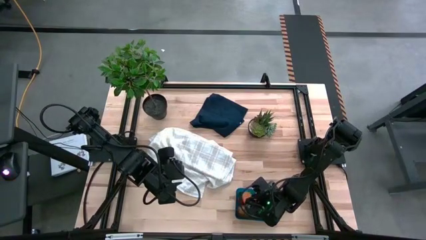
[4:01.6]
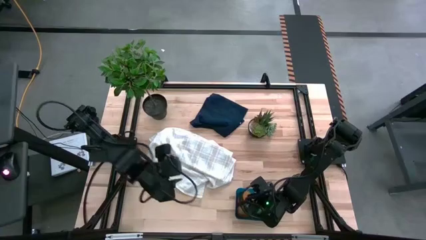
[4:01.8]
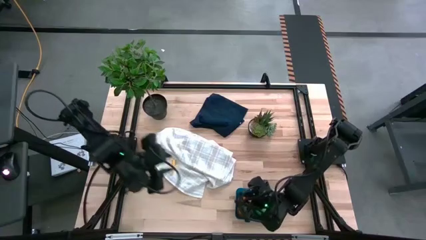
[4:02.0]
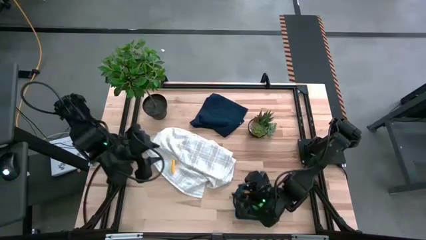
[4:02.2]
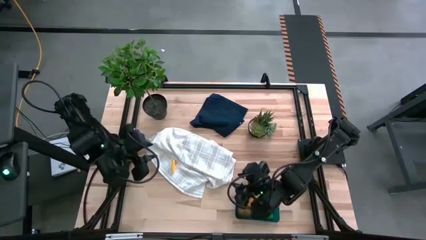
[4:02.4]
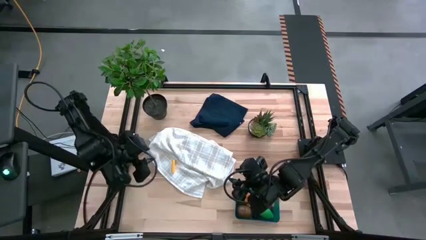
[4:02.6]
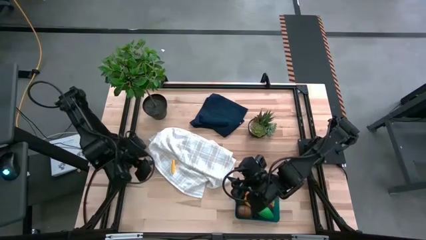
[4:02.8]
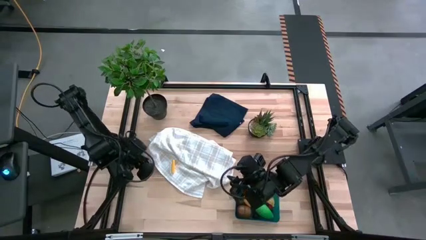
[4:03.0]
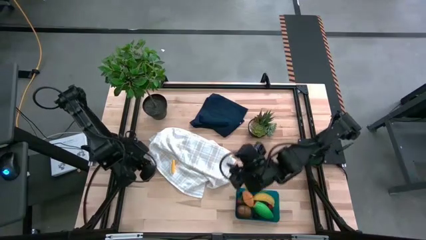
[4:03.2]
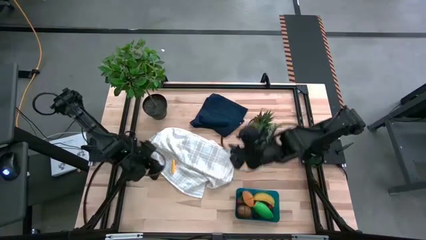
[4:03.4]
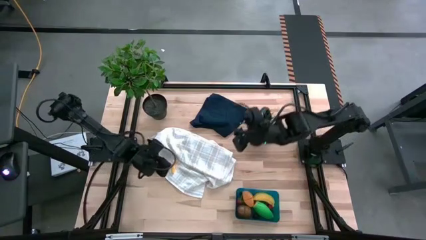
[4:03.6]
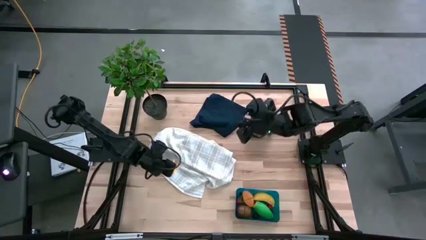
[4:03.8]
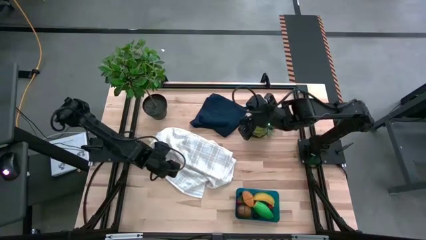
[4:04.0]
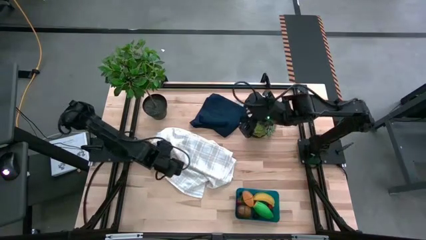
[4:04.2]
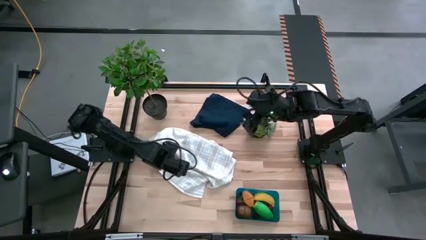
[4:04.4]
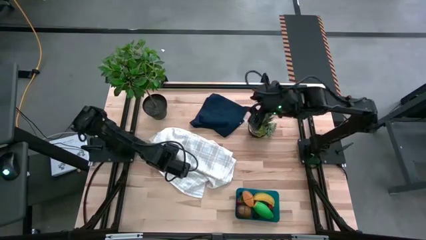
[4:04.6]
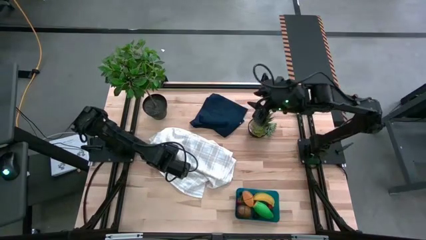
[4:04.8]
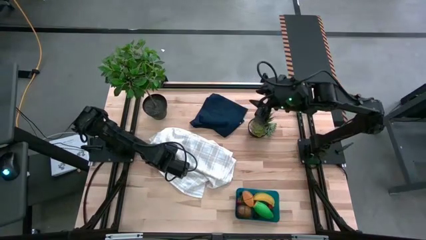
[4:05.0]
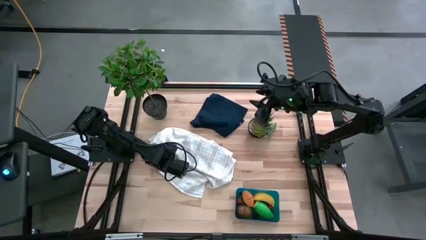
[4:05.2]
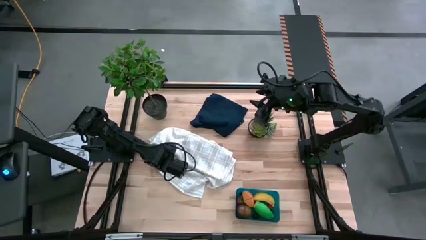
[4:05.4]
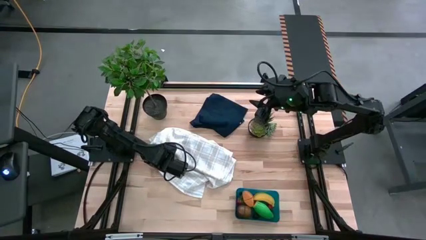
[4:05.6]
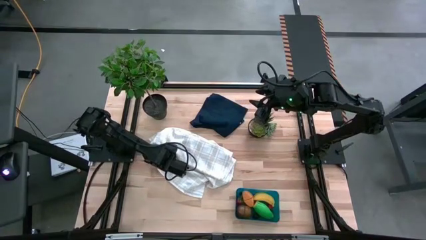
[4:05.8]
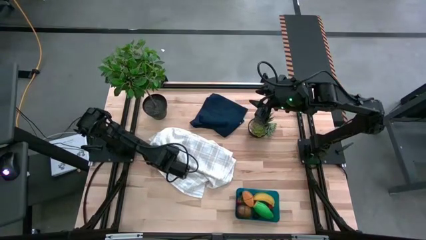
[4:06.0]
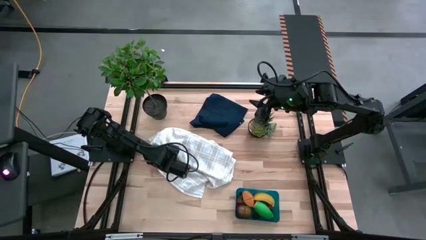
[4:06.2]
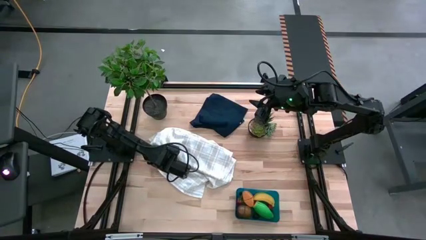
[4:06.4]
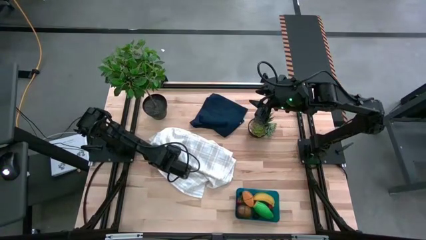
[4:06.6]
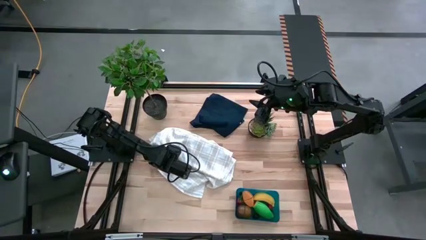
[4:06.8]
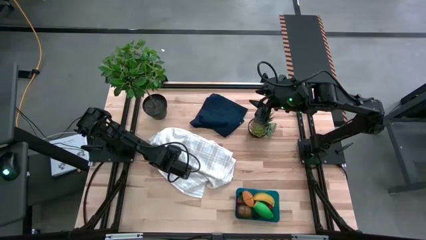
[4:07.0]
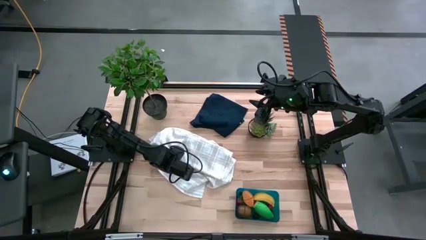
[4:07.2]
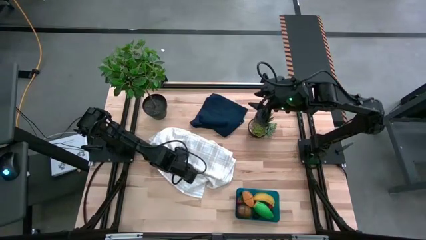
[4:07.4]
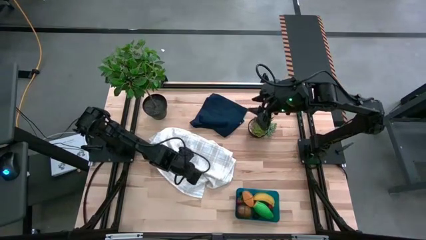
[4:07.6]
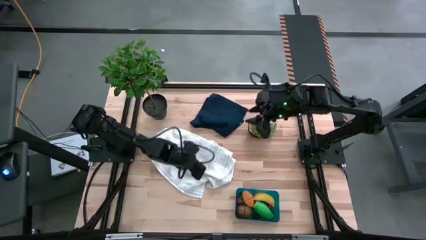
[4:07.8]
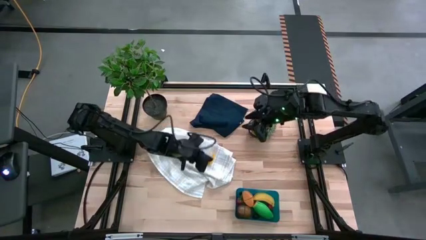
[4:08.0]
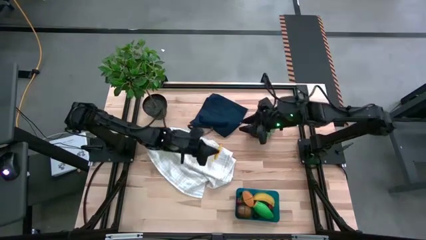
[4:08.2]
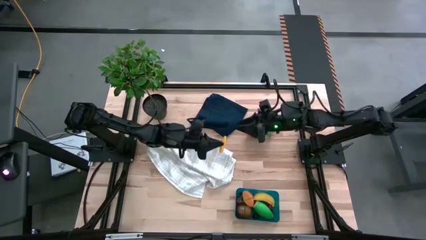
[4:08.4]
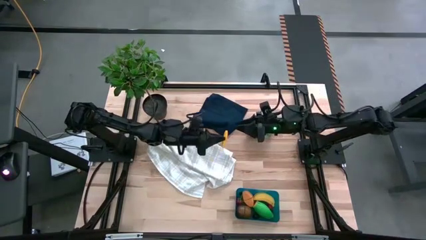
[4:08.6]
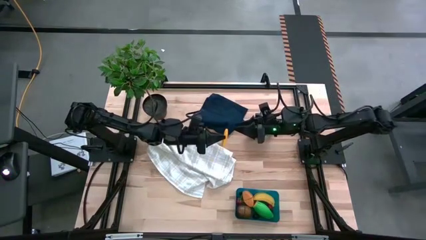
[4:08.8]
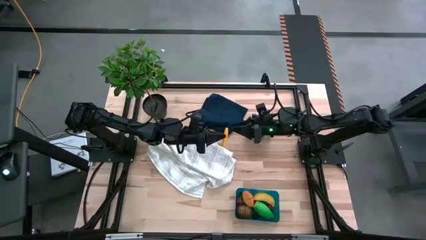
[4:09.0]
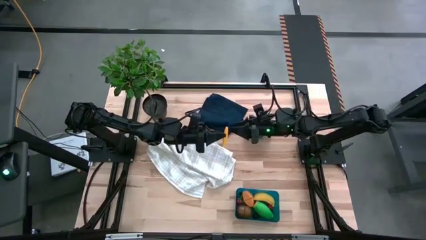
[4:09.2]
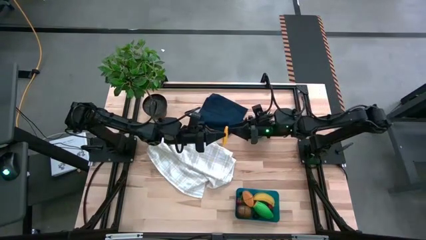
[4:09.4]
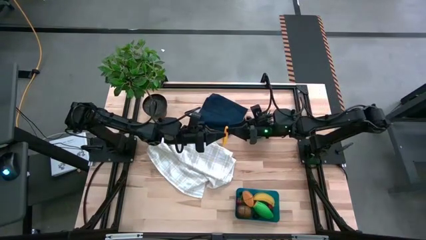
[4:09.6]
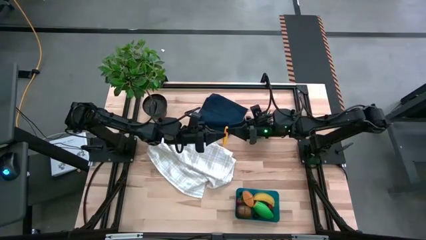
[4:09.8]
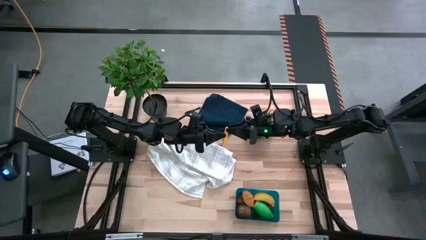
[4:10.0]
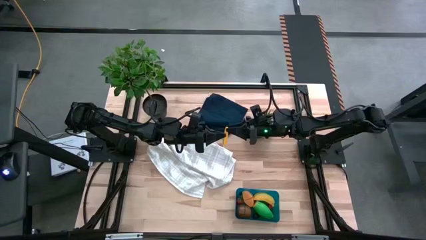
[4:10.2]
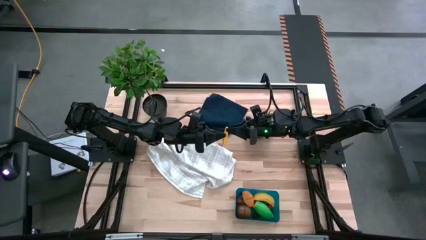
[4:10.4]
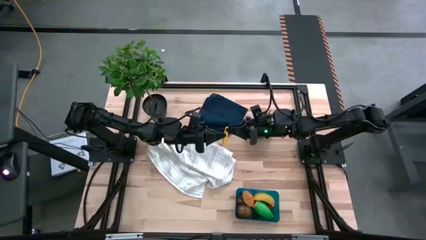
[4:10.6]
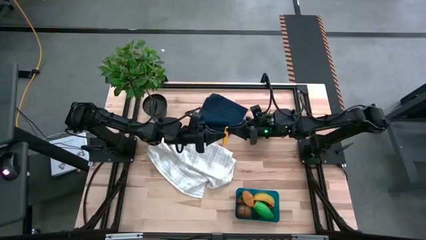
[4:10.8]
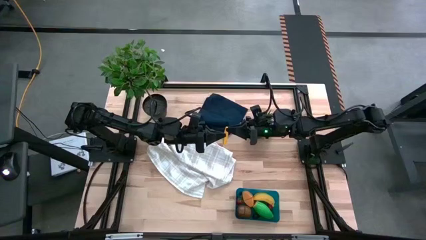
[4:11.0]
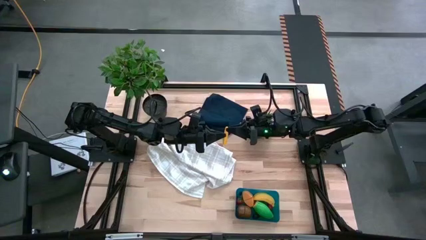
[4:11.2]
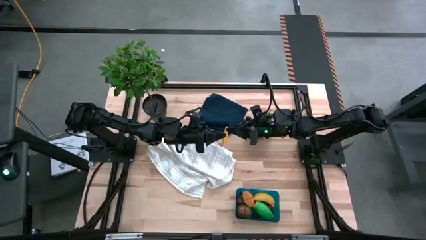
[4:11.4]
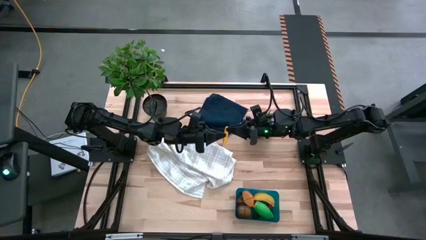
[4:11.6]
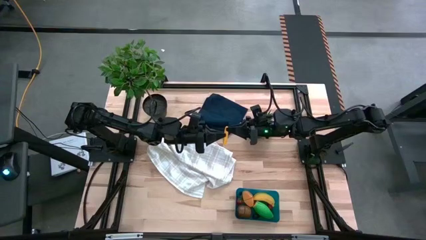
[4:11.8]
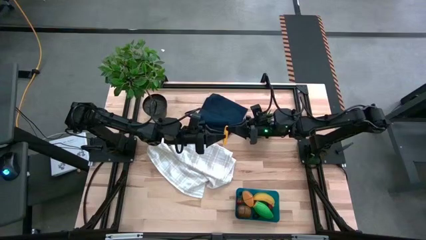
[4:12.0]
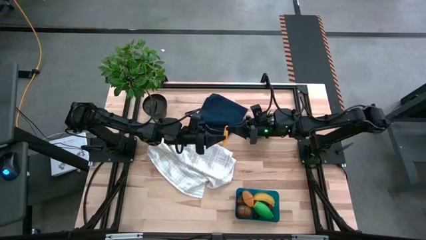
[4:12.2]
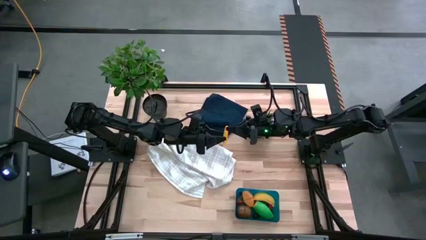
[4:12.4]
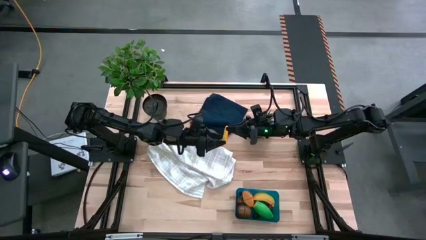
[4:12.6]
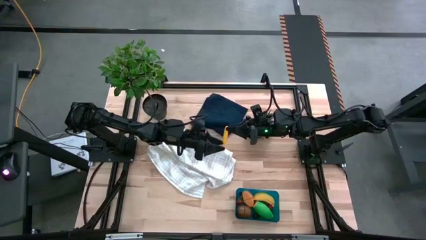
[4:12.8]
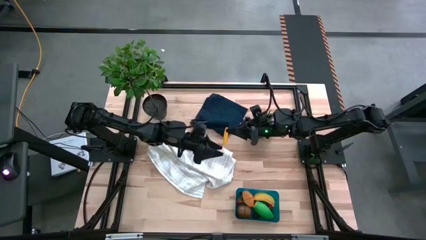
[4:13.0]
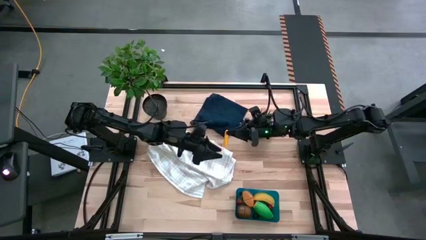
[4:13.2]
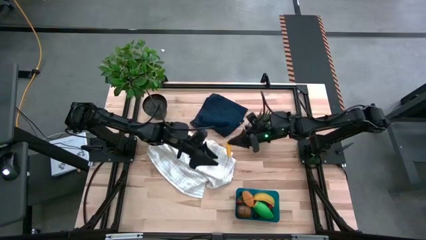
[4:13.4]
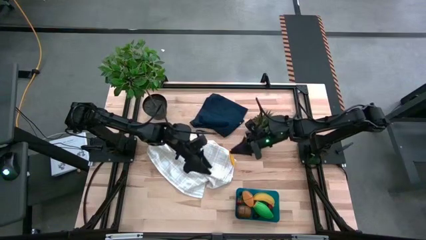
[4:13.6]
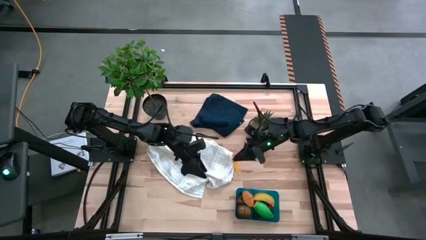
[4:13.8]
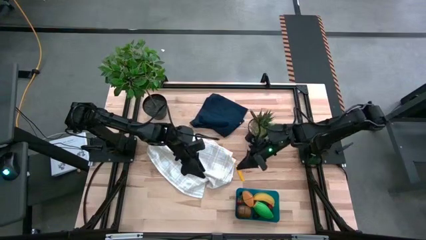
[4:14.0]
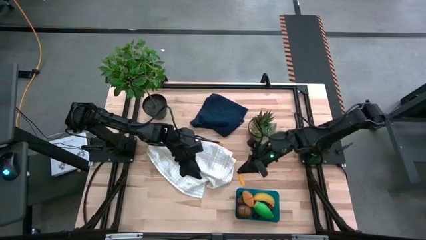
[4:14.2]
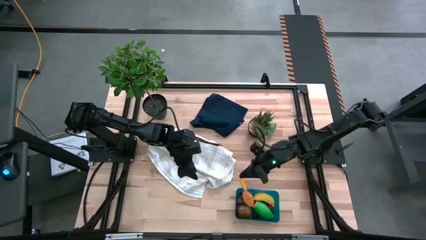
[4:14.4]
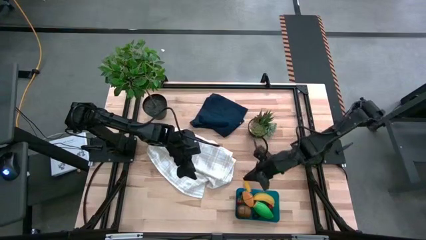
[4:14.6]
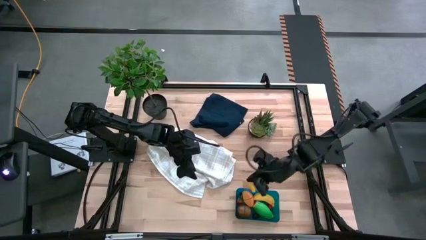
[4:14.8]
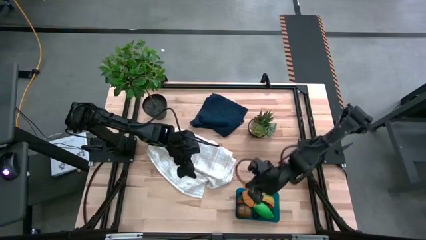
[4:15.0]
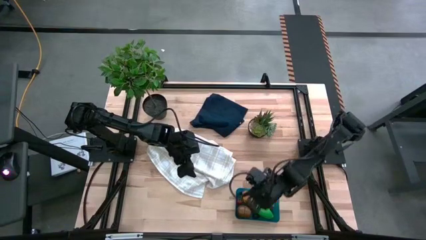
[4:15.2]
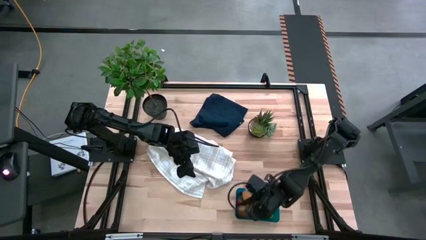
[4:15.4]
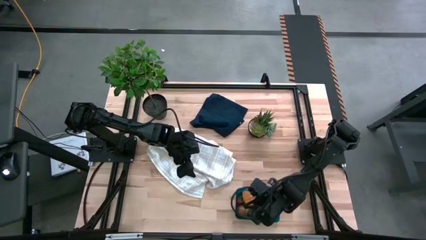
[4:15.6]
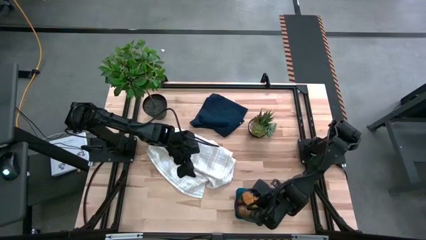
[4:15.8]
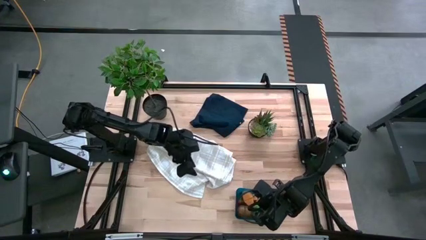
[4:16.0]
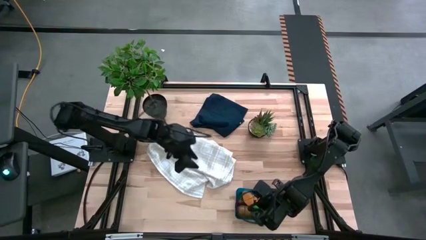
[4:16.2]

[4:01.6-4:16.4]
Task: Pick and placing Produce into tupperware
Put the corn into the bin

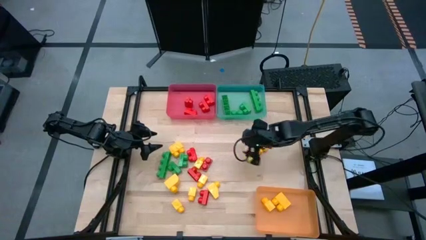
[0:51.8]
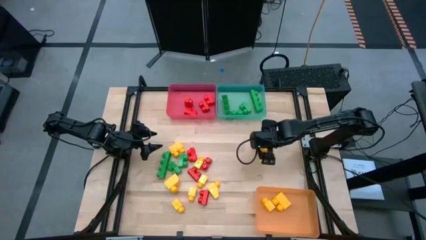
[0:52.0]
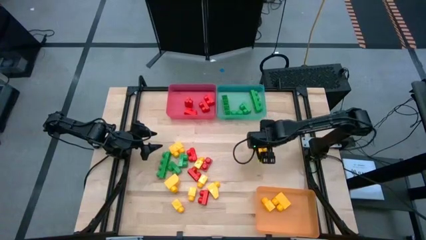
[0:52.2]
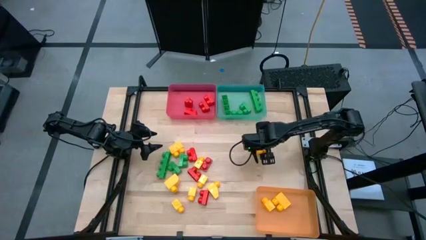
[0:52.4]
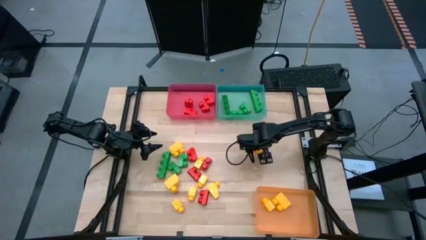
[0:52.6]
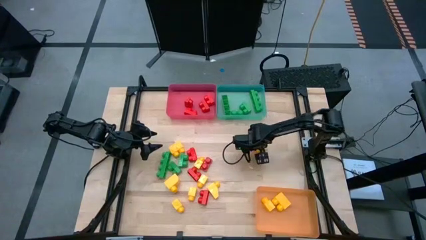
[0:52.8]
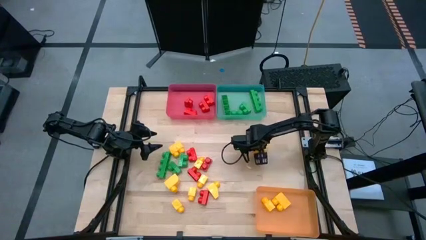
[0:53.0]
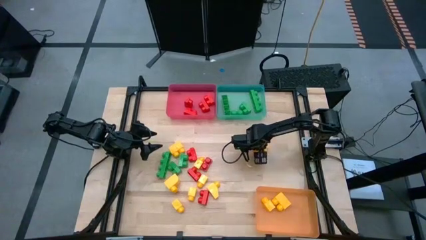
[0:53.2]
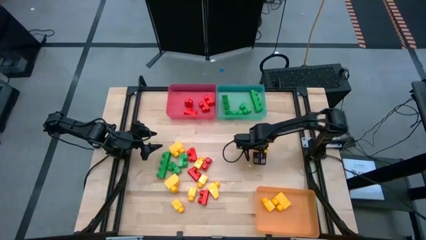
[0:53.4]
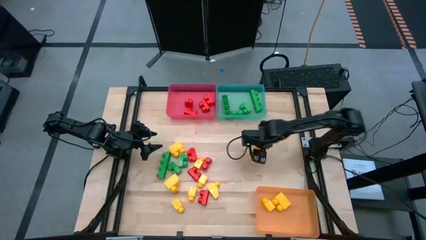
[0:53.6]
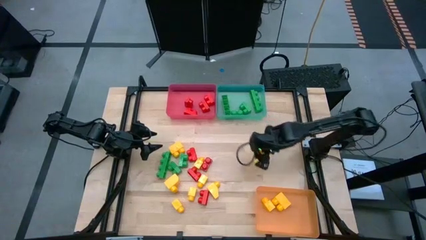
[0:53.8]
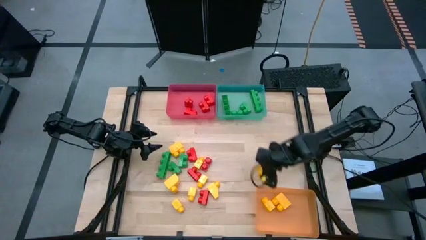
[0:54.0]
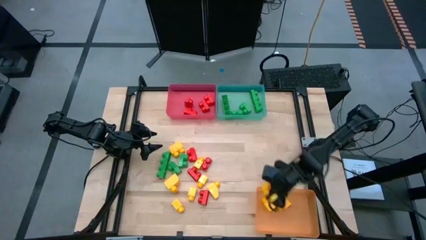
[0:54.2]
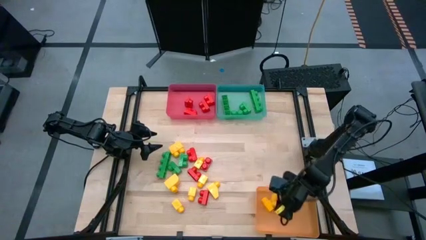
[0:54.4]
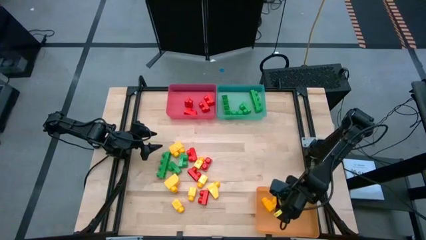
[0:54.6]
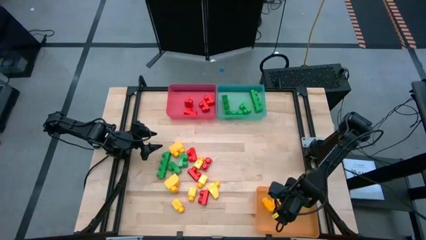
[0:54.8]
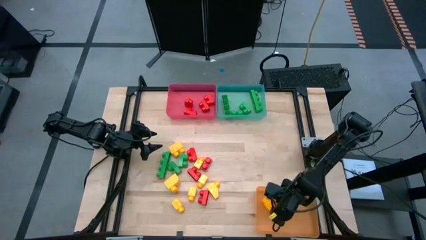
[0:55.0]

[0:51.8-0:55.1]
Task: Sort blocks
Put the yellow game piece into the yellow bin
